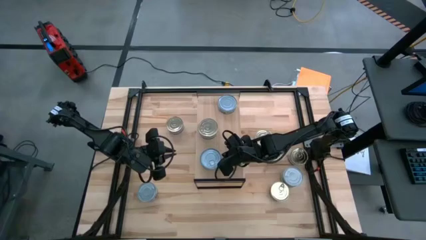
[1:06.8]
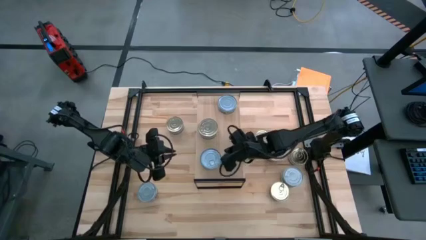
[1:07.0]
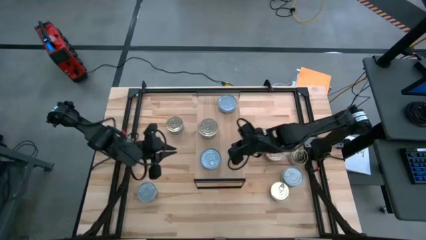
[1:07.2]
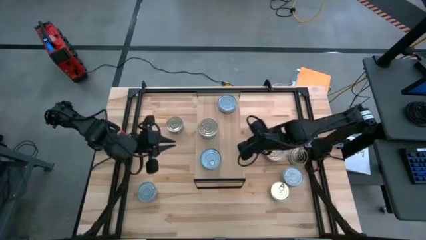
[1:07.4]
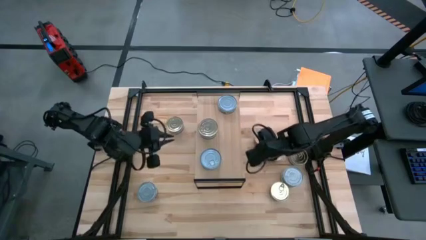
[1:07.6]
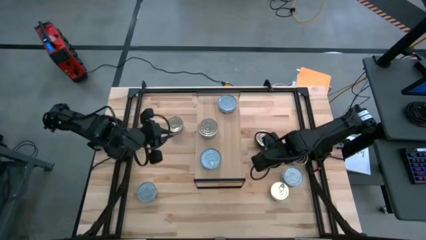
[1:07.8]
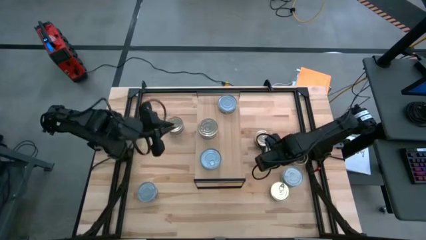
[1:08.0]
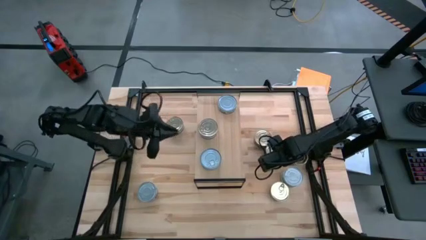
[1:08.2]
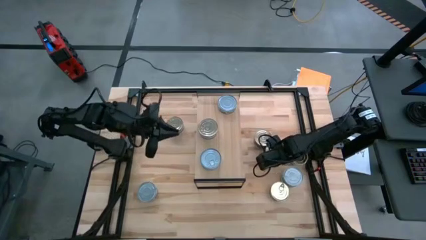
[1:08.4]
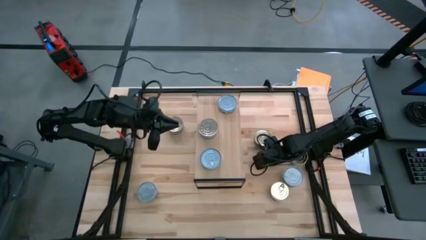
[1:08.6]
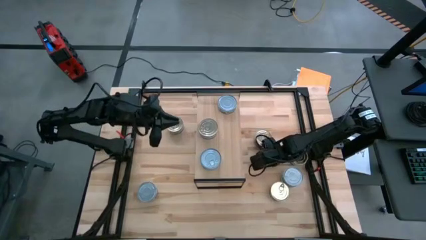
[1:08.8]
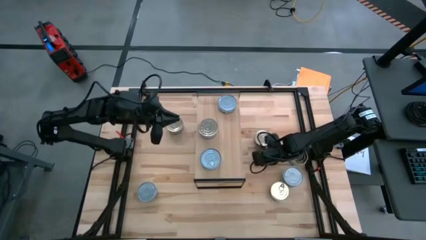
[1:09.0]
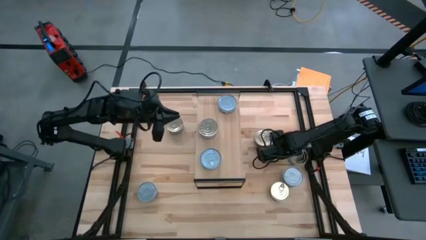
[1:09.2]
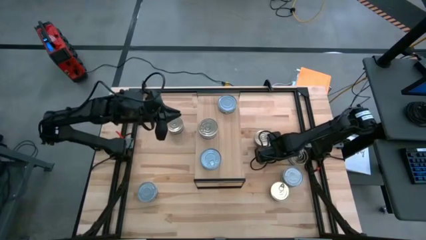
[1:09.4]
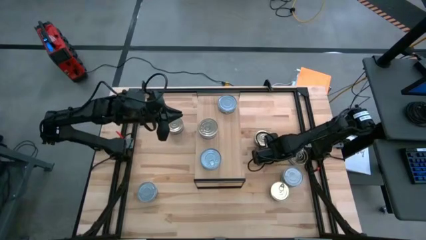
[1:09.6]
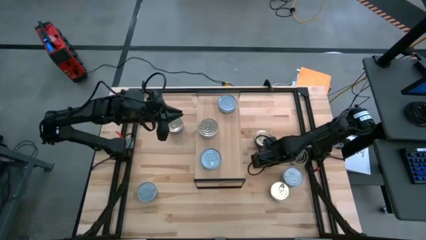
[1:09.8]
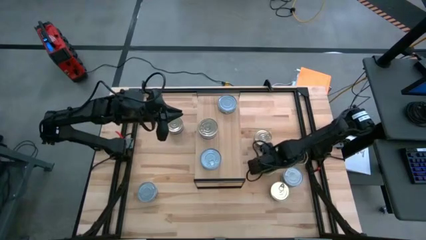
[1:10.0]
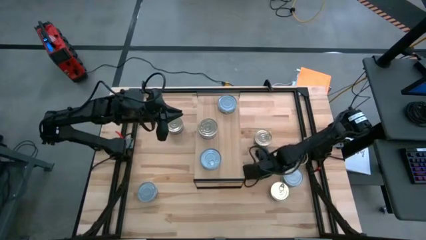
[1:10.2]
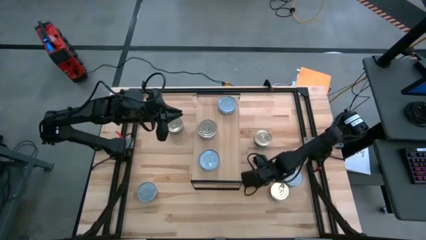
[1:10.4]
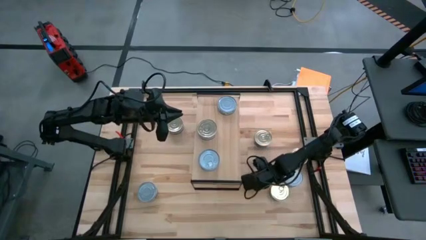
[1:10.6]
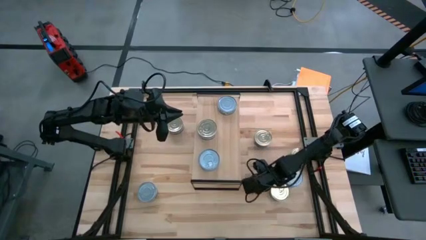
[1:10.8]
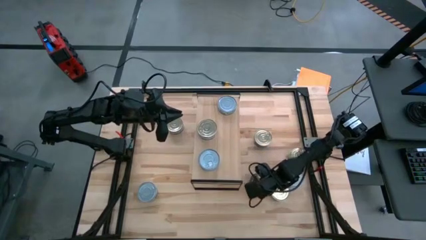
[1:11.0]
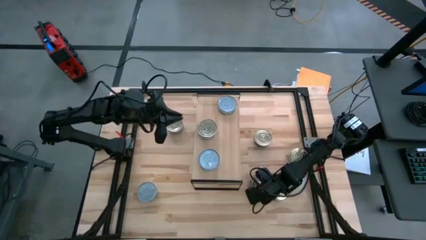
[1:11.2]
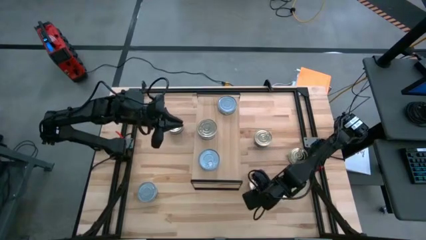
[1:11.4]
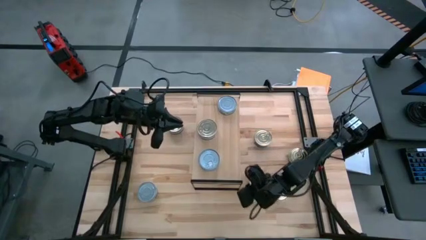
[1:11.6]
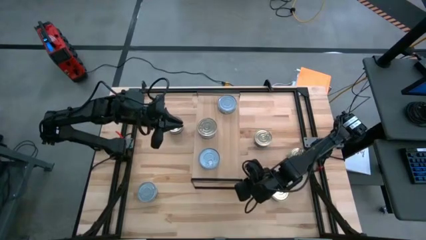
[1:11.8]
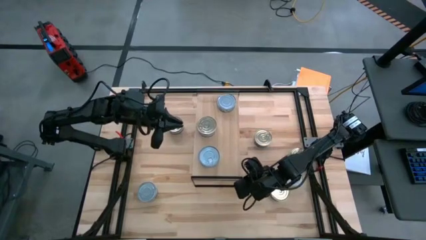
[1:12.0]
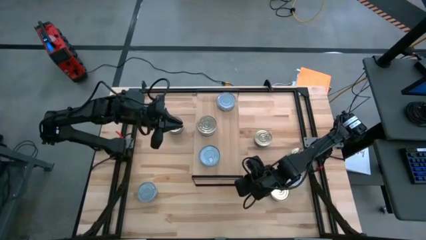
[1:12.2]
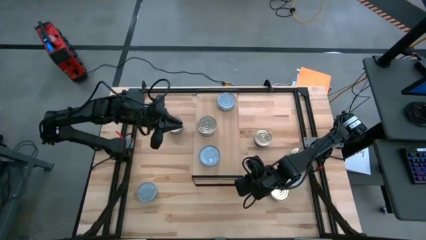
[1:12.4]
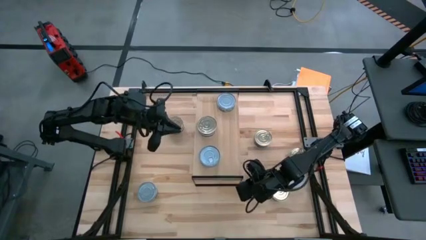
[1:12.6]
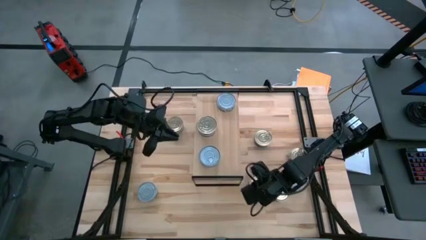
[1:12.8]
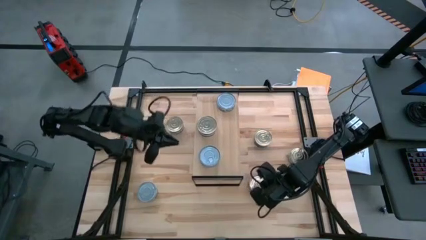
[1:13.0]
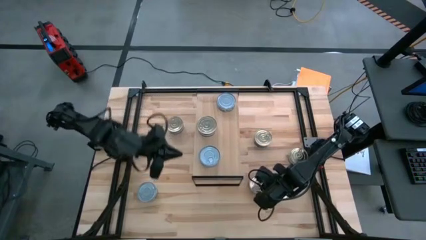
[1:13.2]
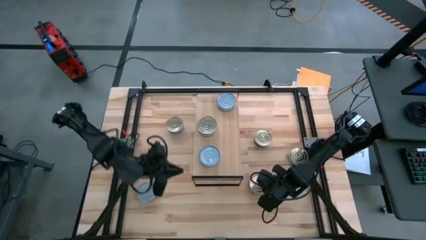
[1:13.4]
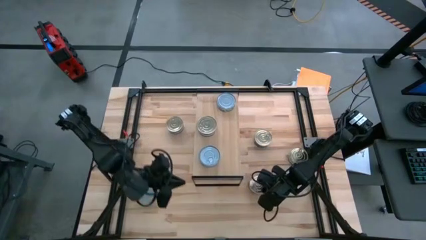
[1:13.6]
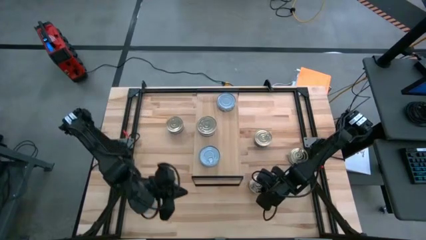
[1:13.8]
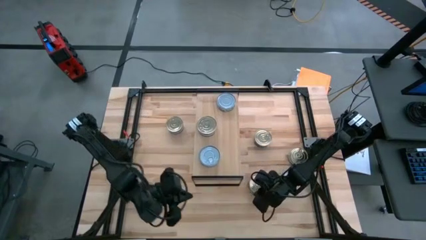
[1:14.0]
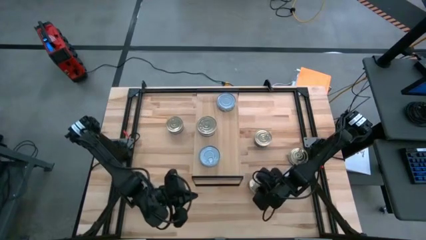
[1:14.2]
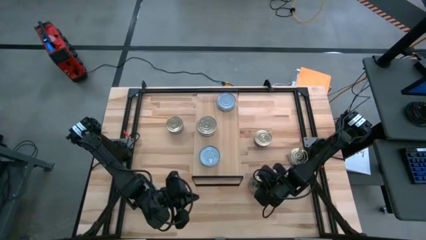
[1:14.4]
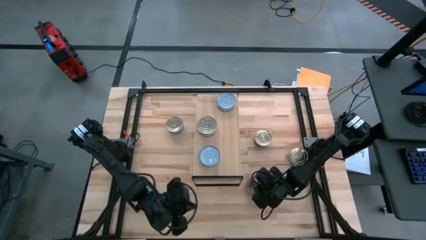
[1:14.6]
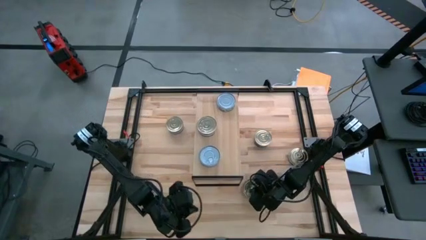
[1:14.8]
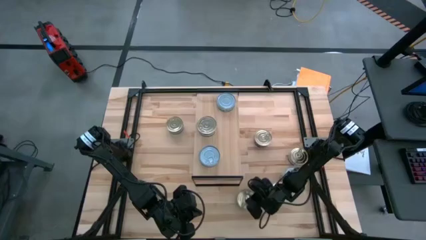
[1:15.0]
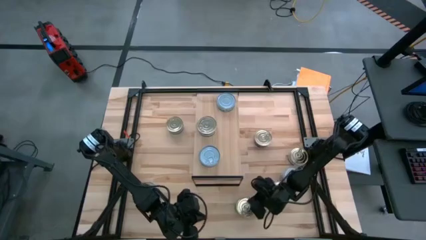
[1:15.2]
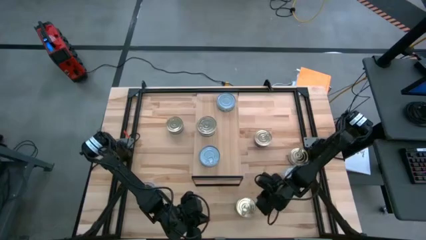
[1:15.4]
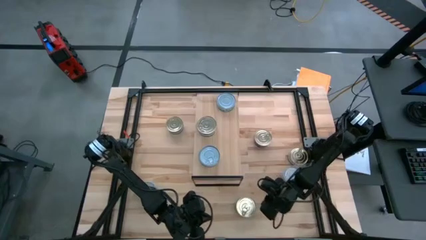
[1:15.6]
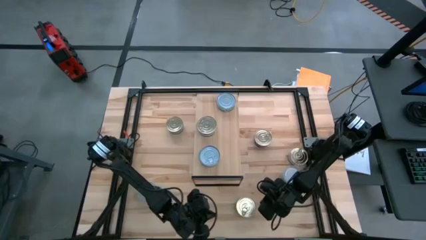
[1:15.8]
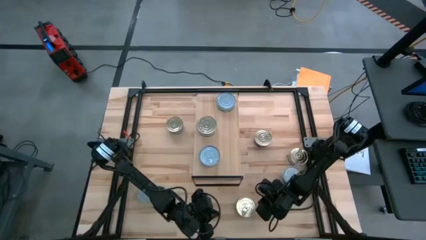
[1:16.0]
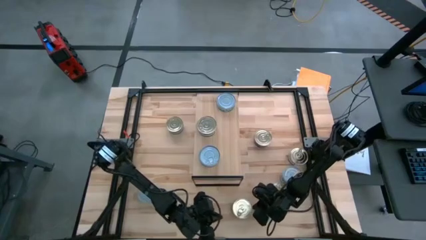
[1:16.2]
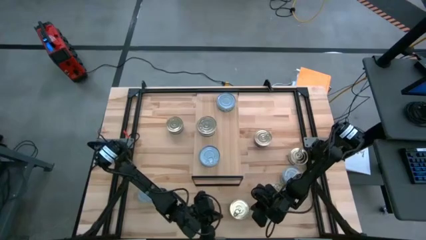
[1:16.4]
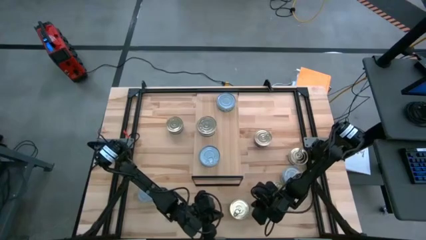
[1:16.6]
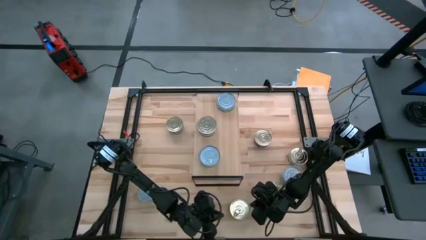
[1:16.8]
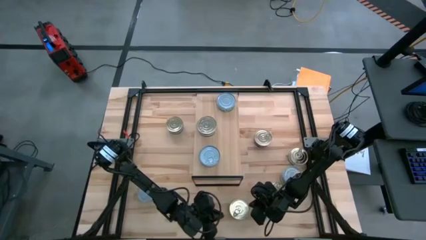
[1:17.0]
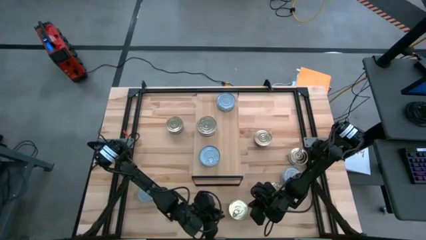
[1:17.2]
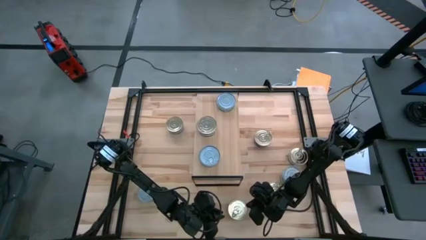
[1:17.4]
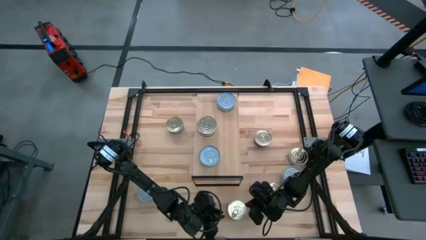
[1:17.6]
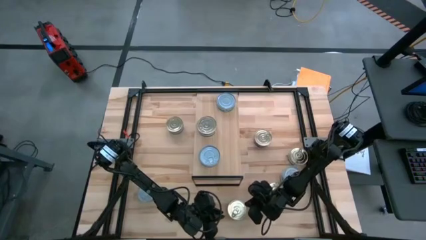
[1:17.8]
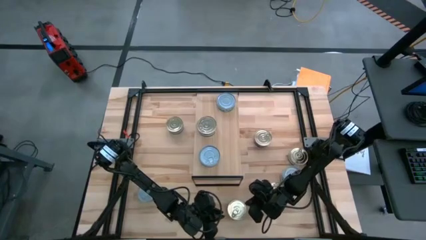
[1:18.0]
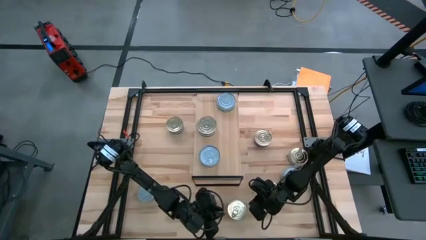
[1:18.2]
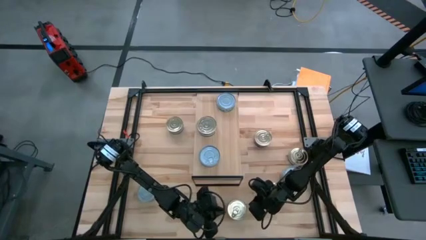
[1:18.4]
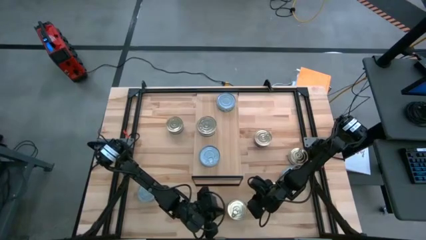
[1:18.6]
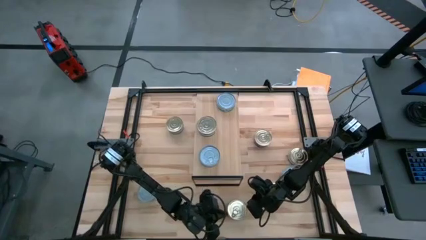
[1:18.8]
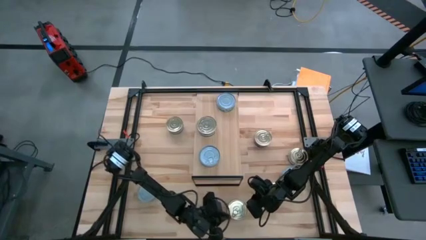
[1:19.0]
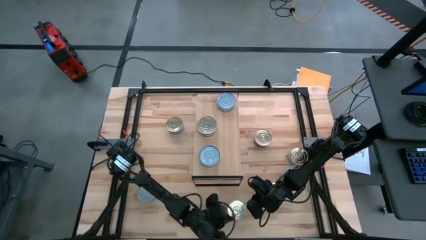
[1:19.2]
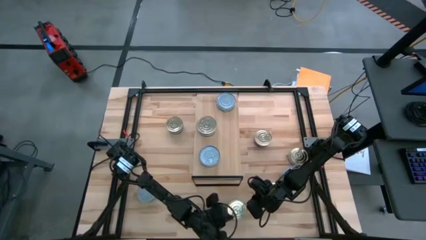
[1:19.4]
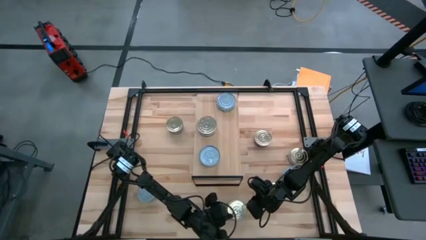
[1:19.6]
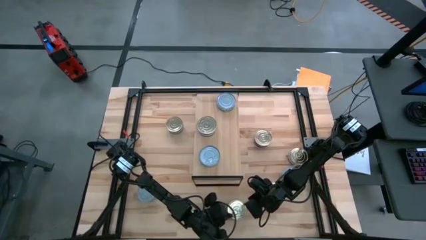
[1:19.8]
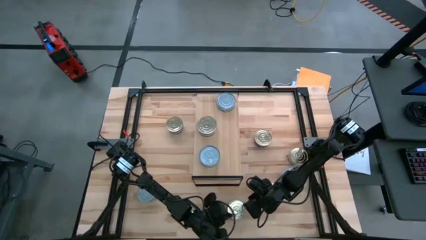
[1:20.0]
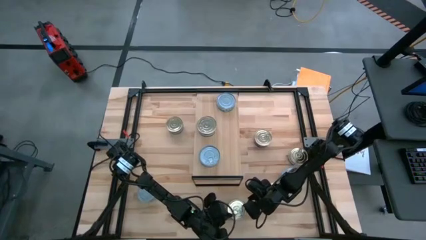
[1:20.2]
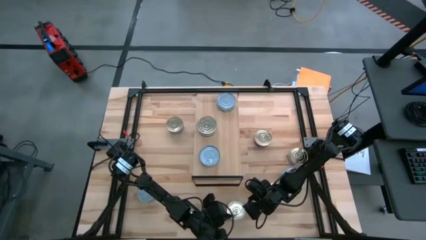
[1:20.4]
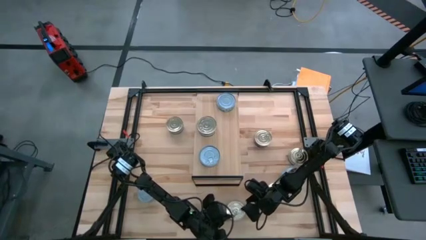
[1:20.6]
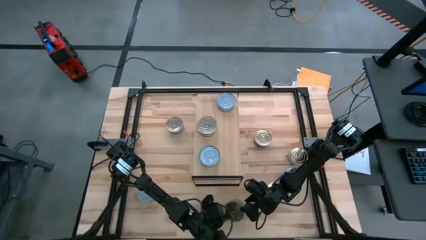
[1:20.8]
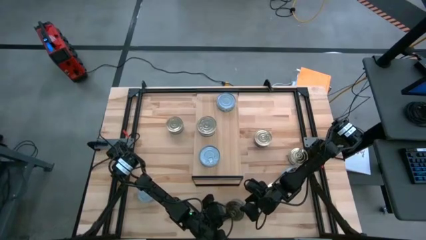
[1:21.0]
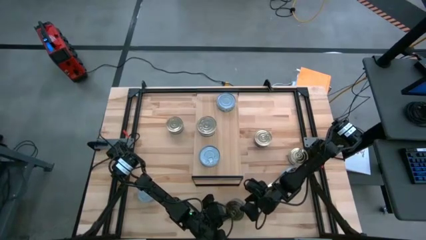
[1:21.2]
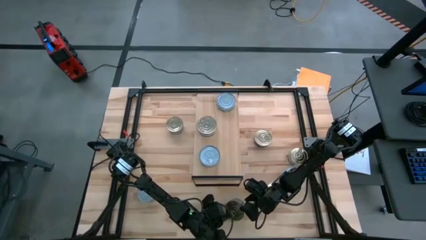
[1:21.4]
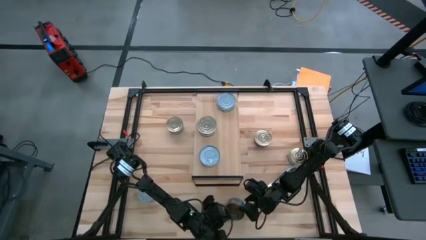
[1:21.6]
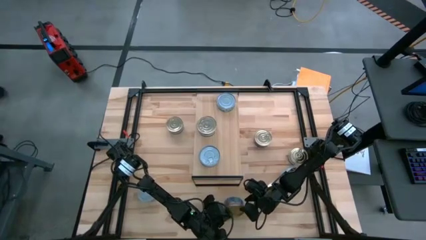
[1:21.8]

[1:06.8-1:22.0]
Task: Stack canned seafood by type on shelf
Stack the blue and pink tuna can on top of the blue and pink tuna can on the shelf
